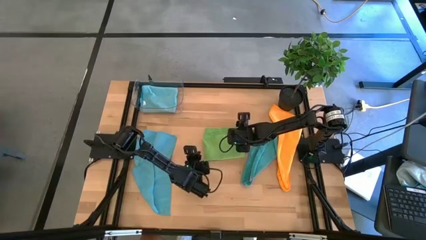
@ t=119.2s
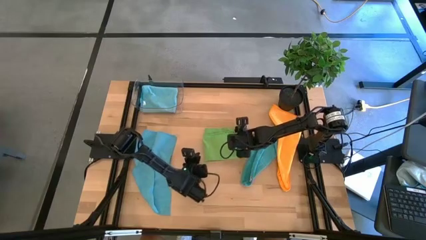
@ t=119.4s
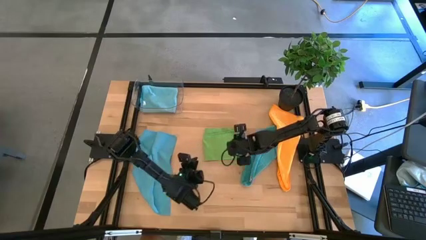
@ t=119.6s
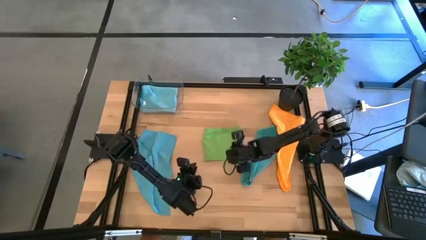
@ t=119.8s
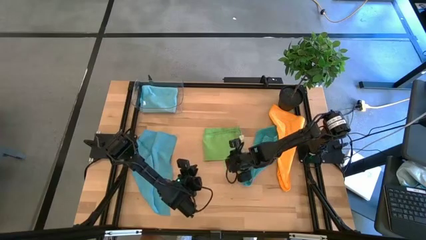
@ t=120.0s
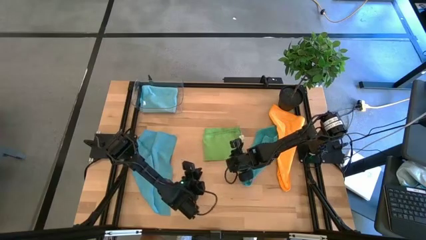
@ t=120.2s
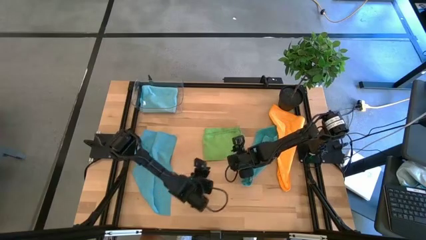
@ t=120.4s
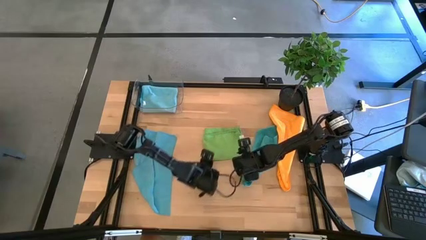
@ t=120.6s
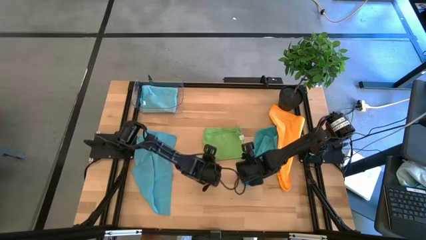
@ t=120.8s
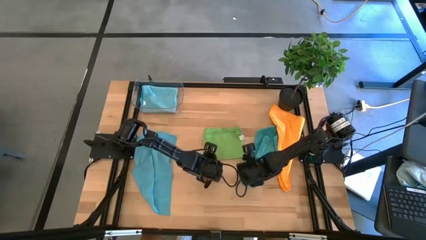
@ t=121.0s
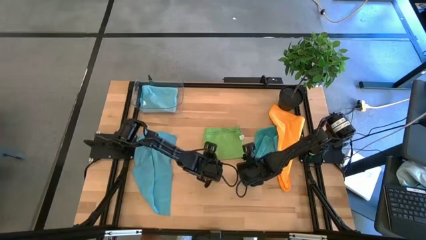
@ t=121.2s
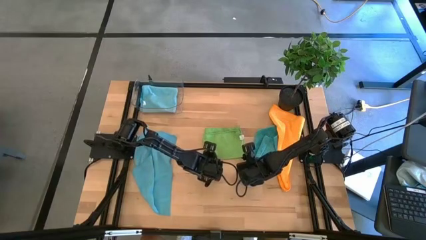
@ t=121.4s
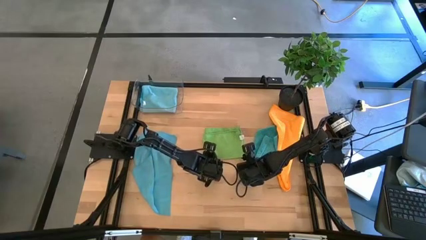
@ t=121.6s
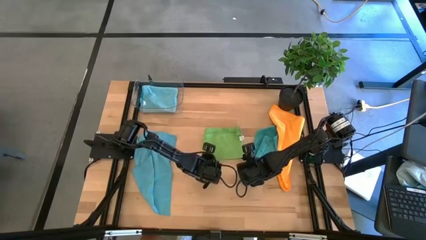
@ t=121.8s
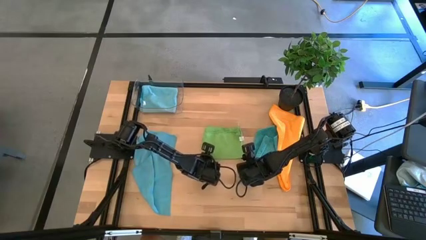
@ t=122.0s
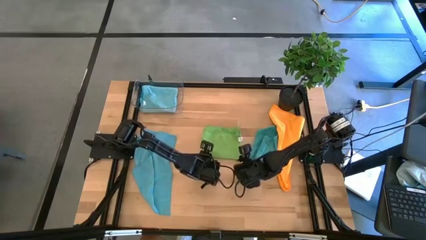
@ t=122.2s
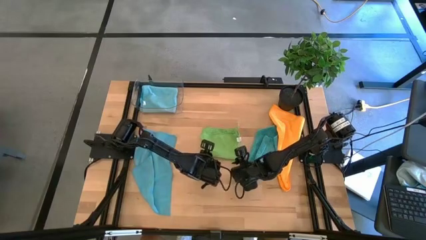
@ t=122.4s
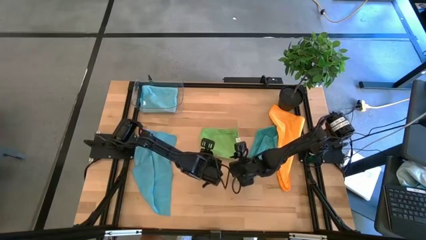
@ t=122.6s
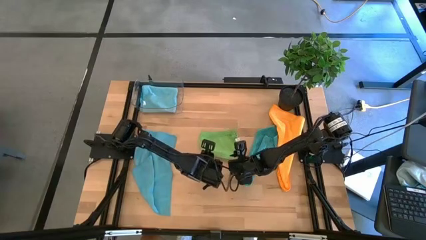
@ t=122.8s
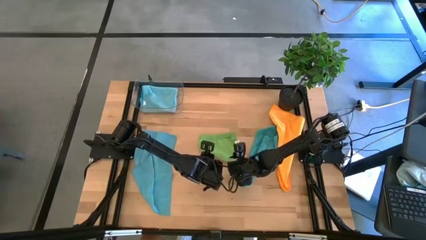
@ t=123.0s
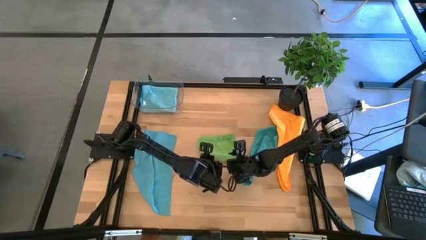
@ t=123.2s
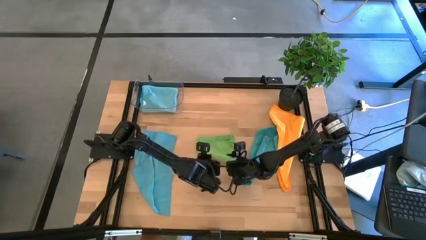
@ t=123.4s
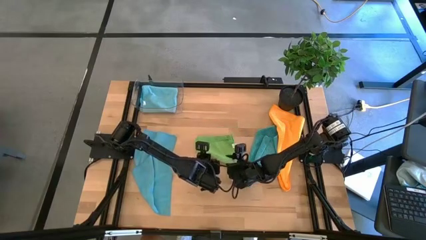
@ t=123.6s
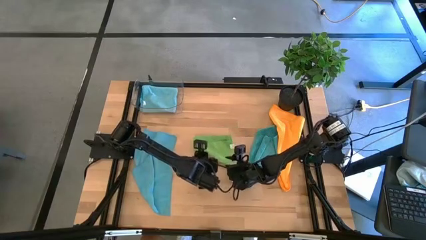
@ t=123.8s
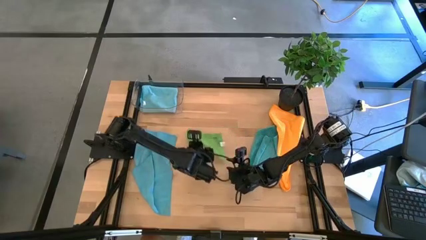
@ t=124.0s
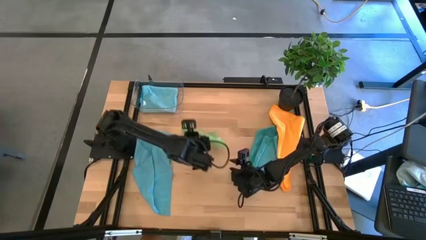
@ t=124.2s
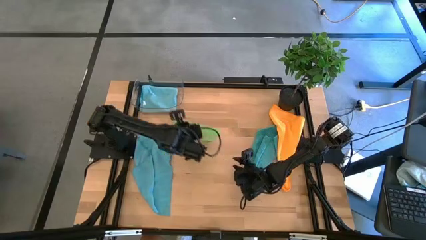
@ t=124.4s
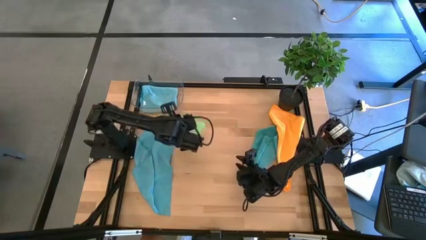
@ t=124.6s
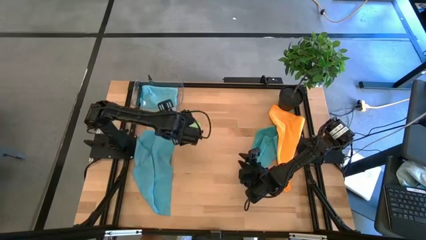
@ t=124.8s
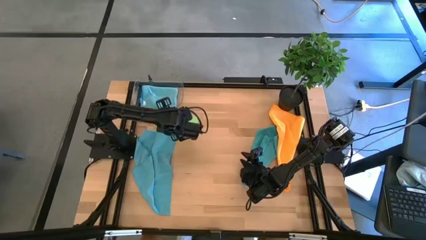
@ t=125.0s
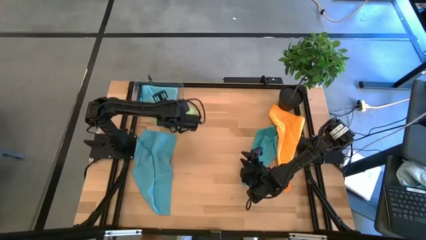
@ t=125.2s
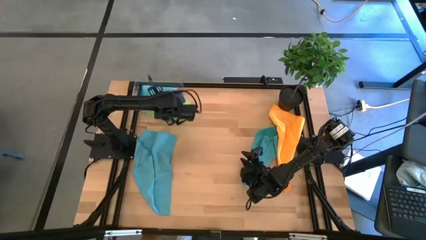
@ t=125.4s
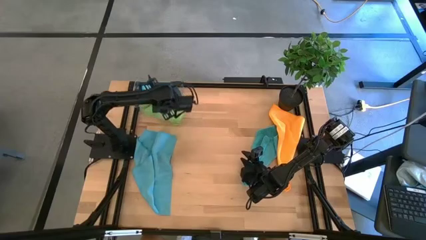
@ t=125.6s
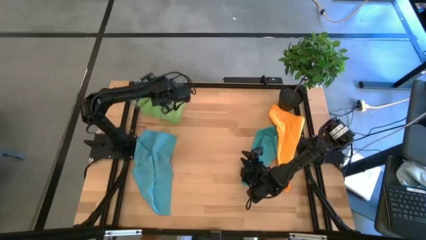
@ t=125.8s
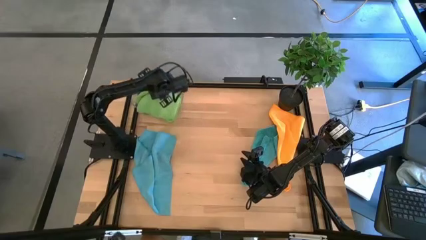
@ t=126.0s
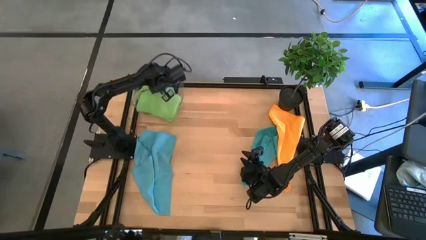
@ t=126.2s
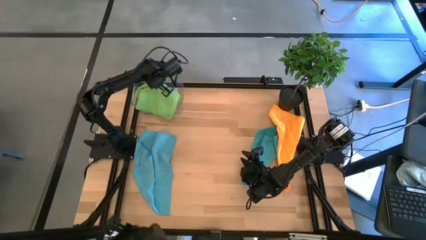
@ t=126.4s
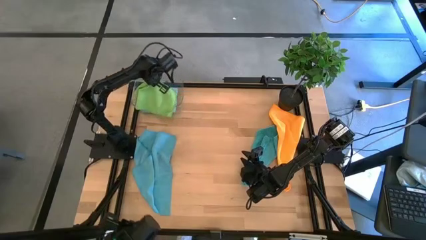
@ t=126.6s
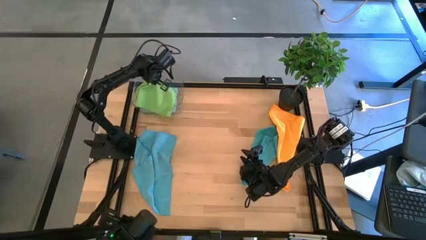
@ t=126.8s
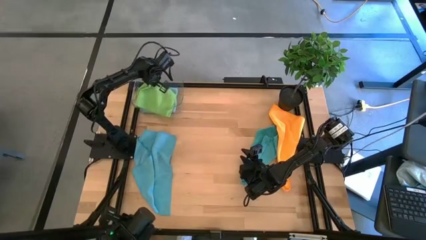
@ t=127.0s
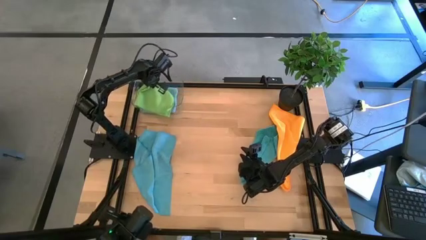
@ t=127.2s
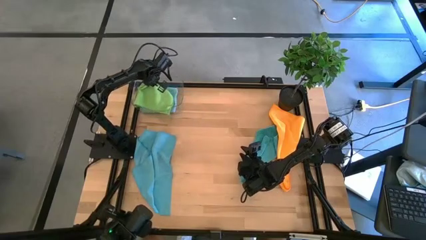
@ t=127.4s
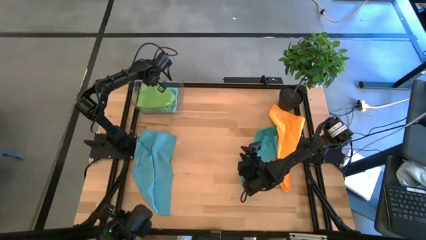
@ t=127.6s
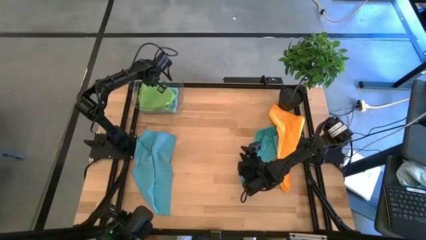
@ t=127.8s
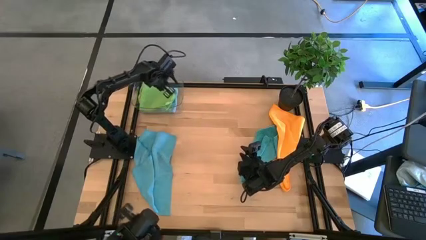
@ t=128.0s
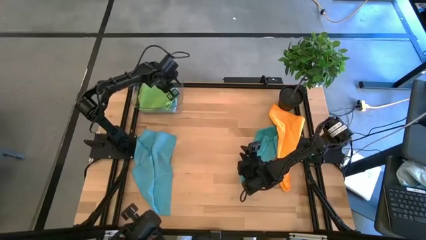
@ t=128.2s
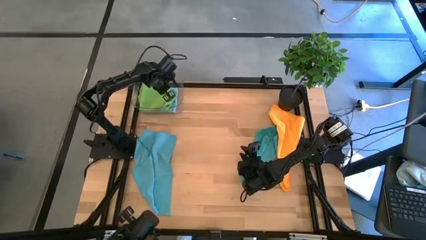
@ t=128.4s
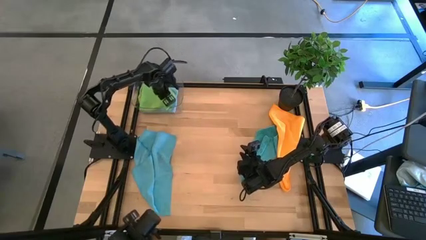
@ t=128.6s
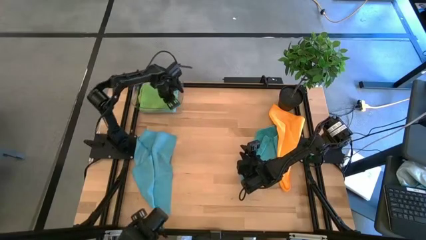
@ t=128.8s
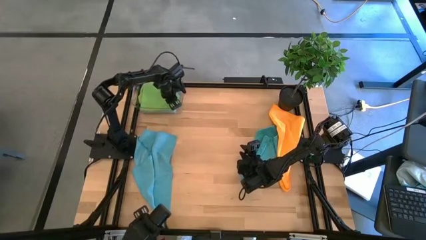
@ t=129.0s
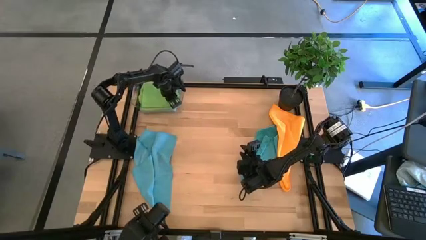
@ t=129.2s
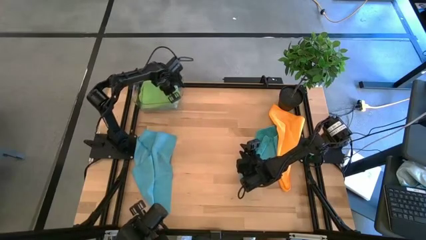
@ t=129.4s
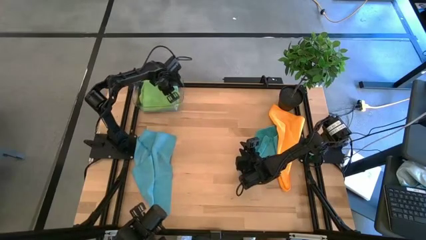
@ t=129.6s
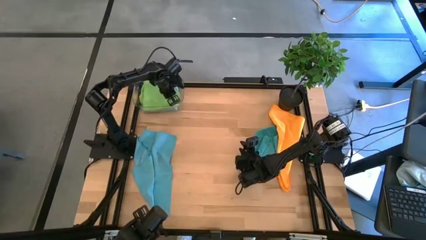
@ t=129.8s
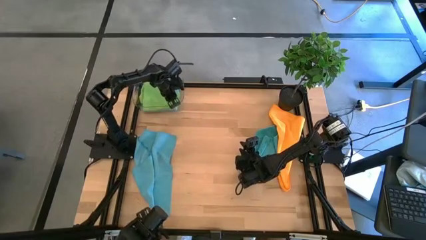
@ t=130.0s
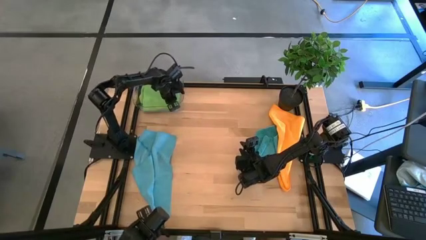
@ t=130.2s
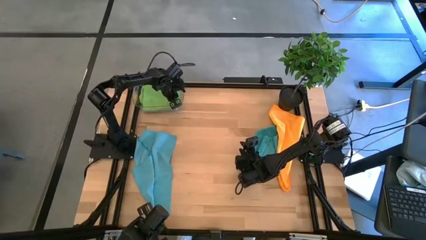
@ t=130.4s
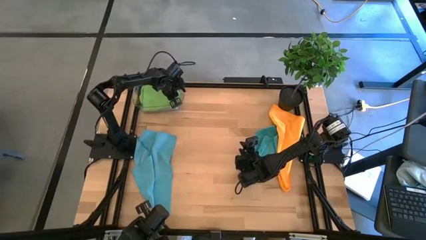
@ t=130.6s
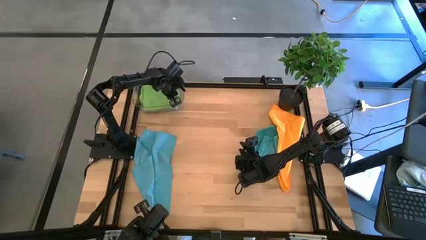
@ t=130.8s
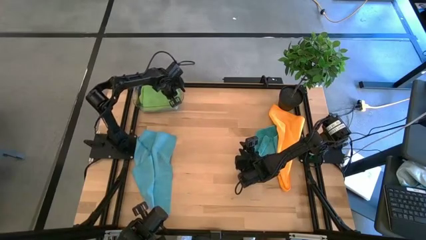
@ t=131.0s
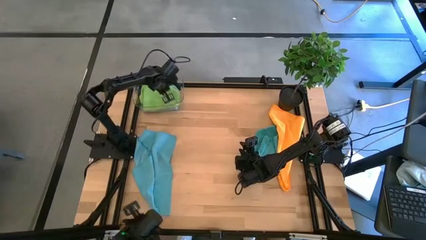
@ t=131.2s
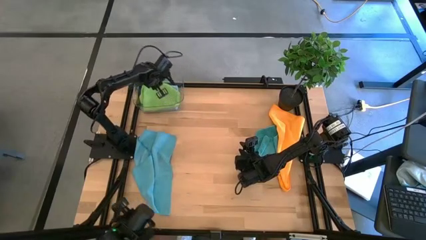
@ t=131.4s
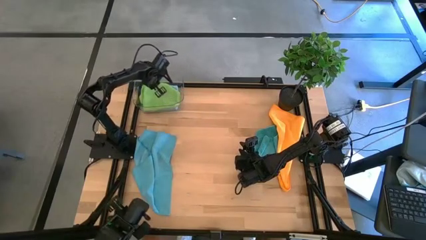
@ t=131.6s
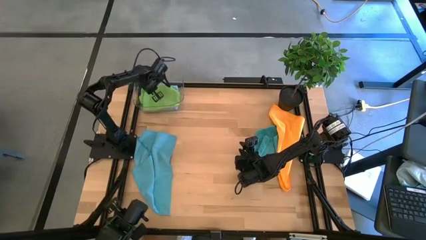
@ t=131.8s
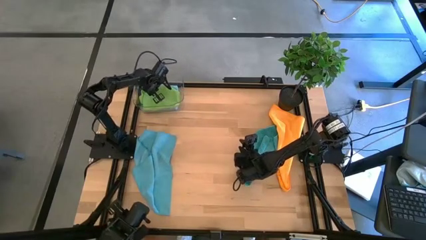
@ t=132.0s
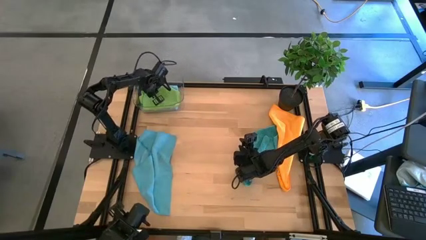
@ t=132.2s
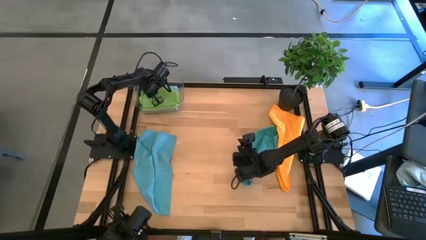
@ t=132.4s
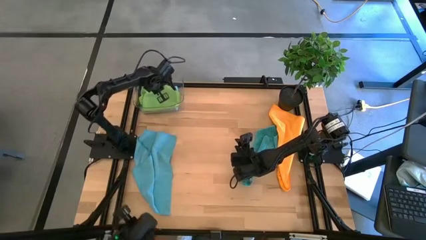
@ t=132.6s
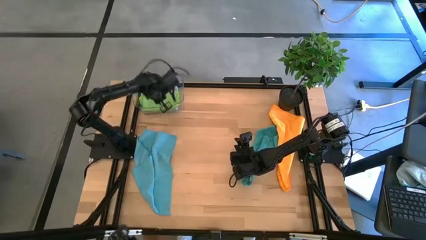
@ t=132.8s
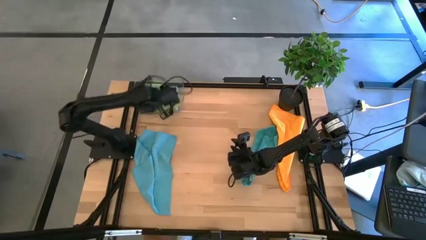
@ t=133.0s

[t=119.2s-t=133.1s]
Task: Fold microfiber towels
Stack the green microfiber cloth on top of the light blue microfiber cloth in the transparent bin
